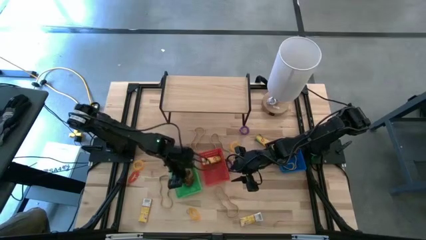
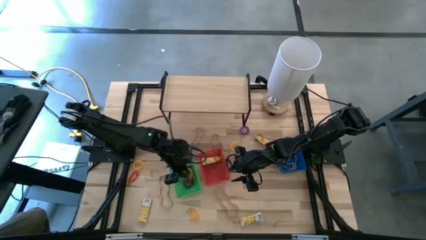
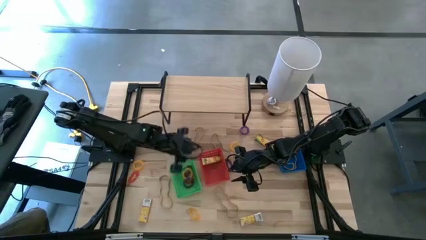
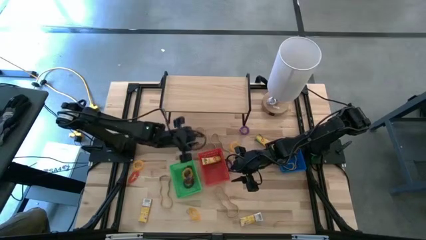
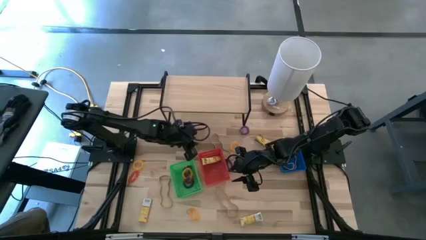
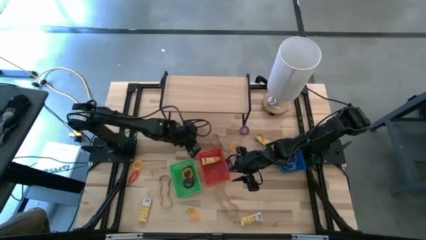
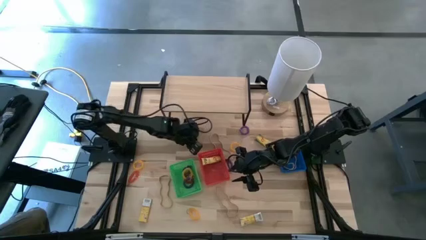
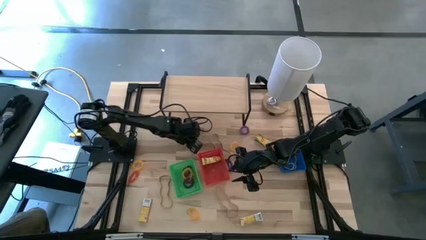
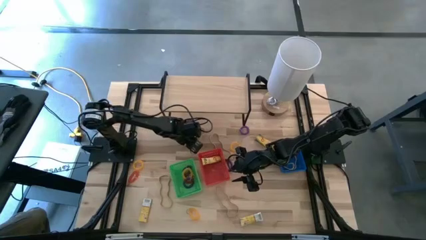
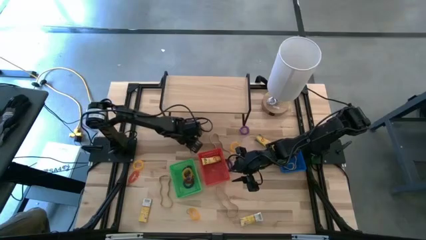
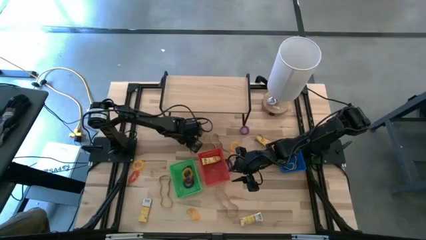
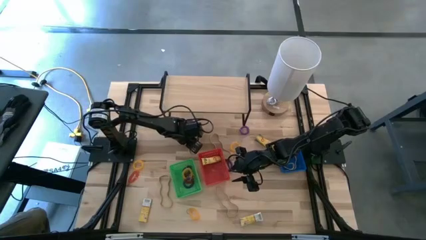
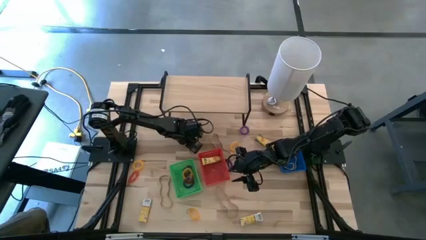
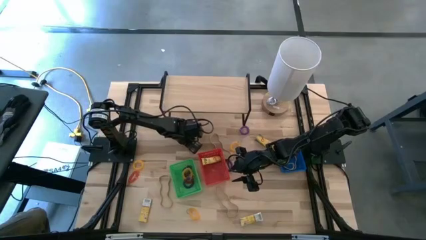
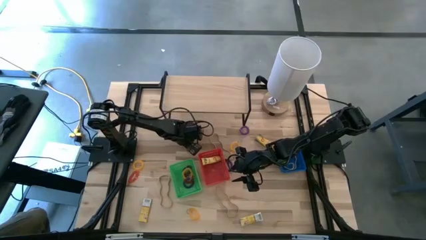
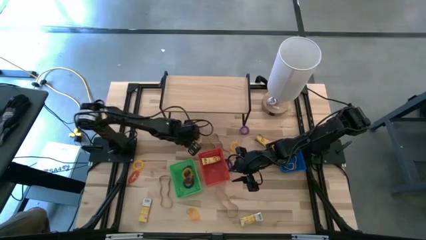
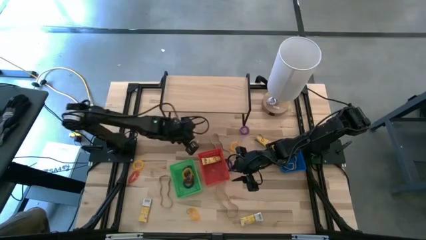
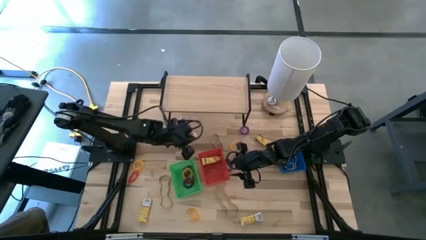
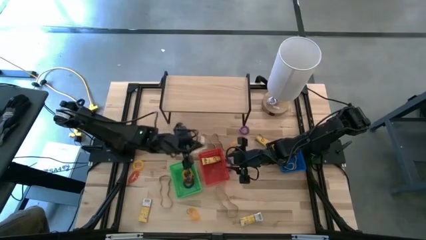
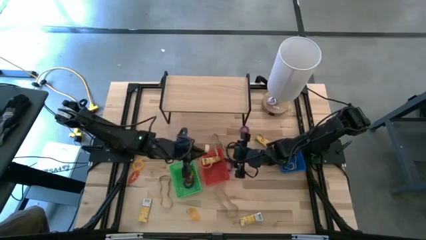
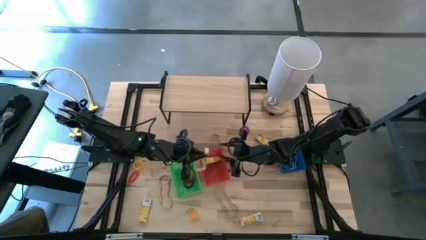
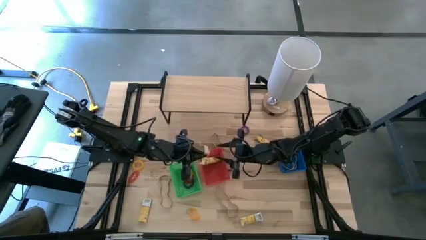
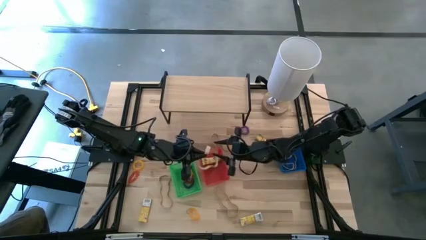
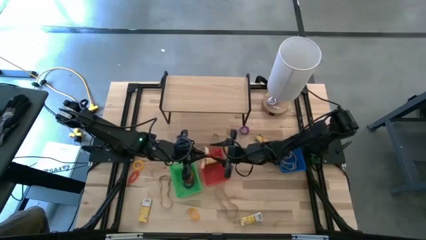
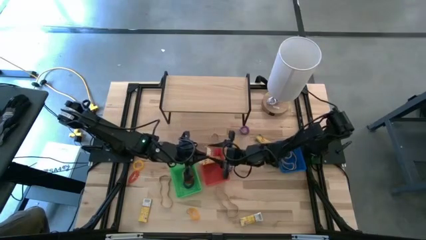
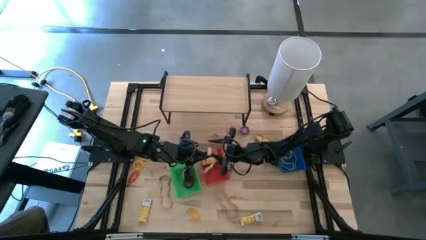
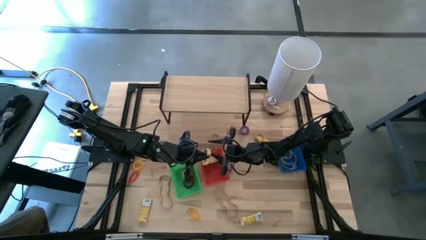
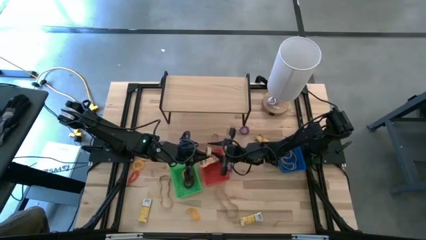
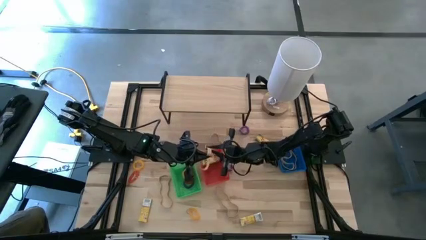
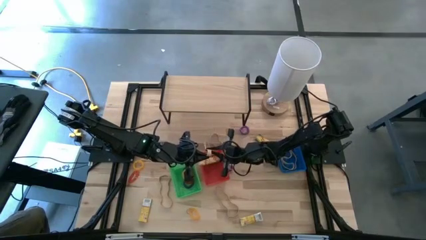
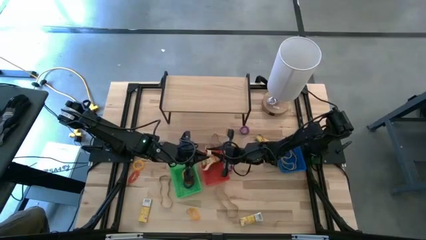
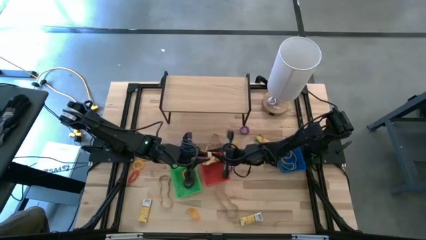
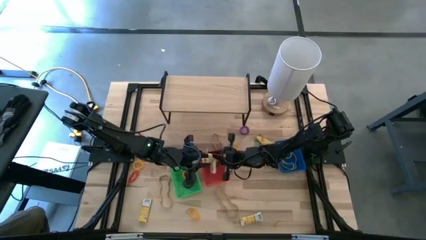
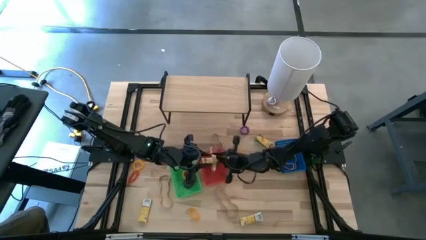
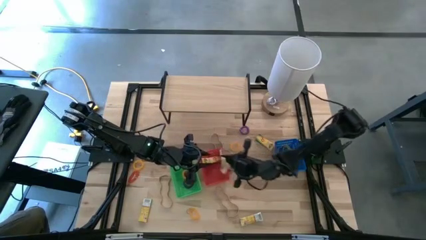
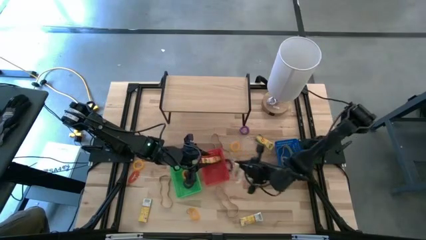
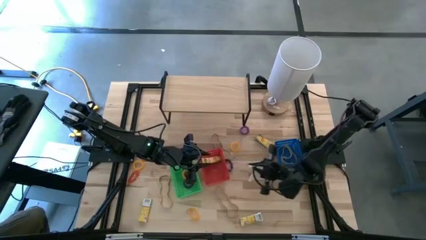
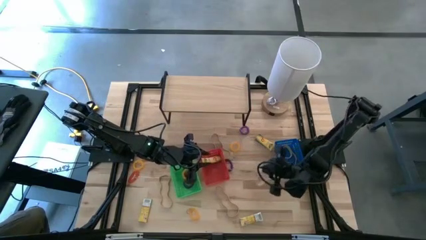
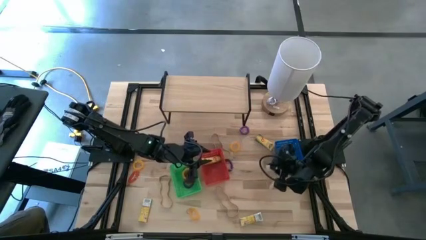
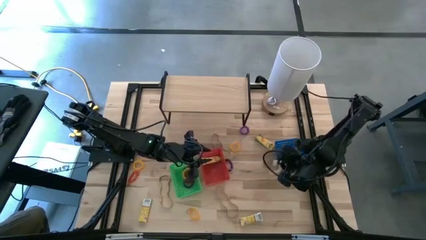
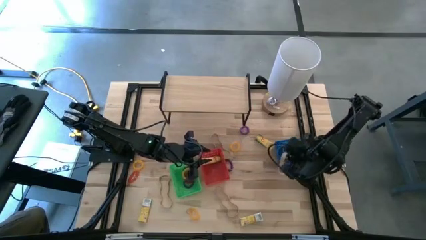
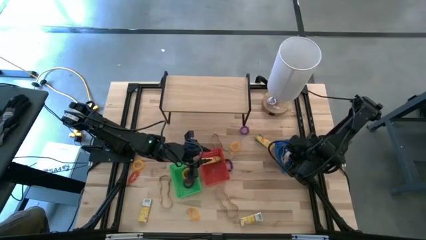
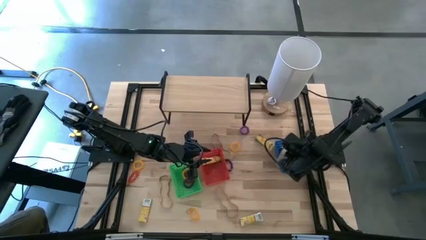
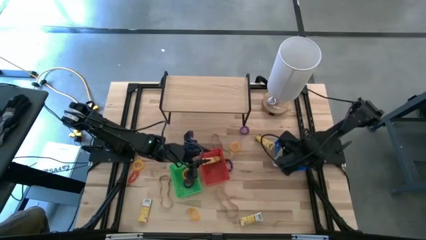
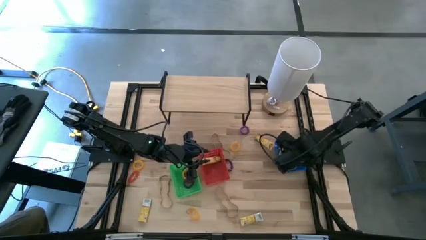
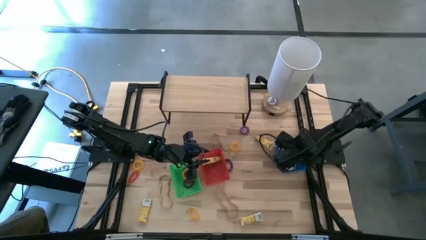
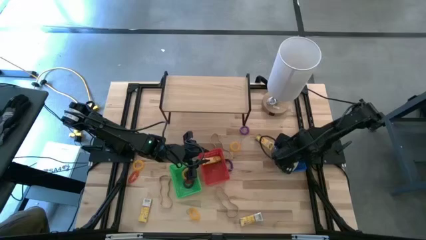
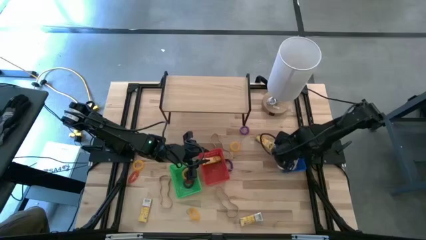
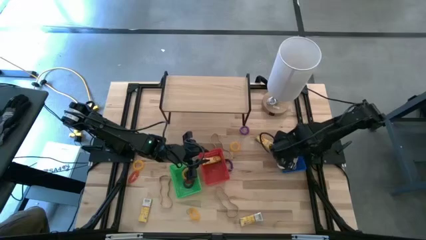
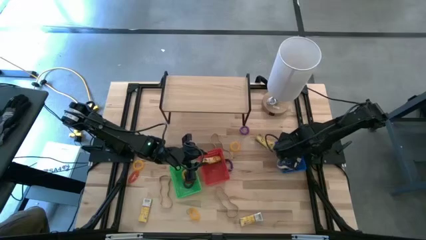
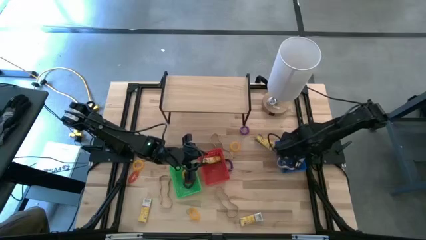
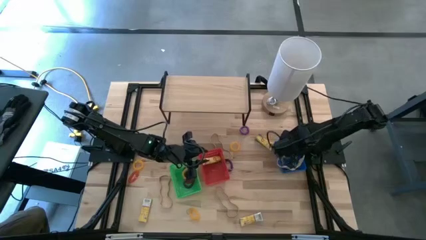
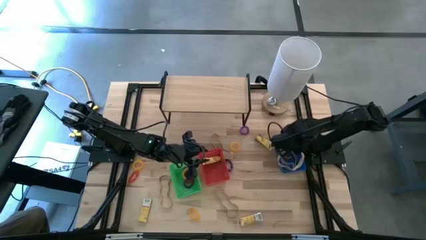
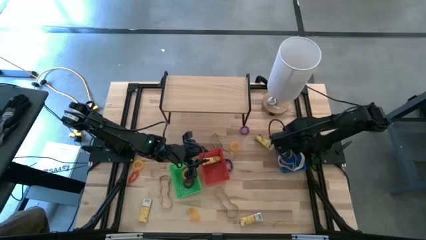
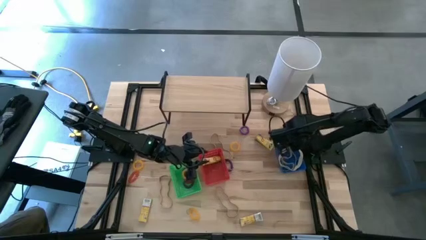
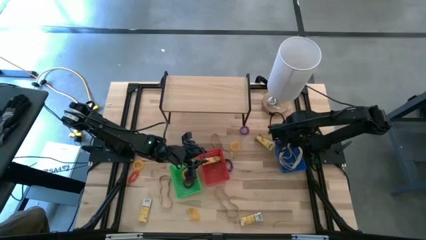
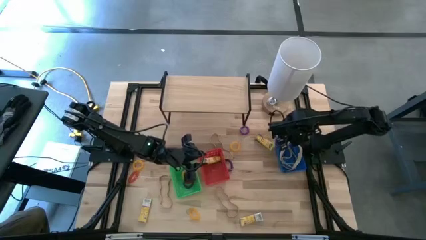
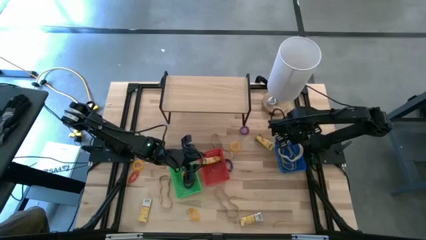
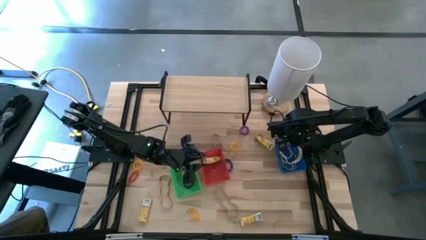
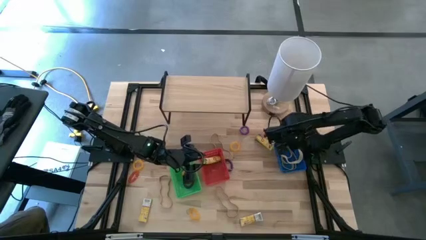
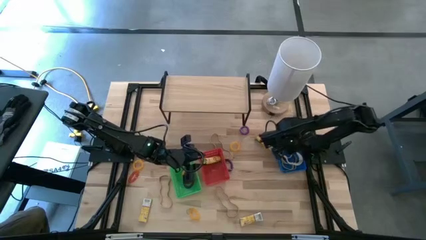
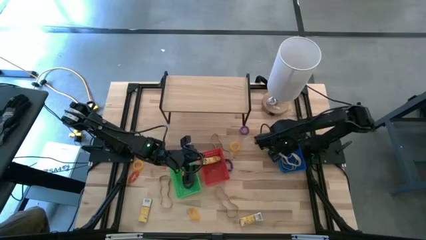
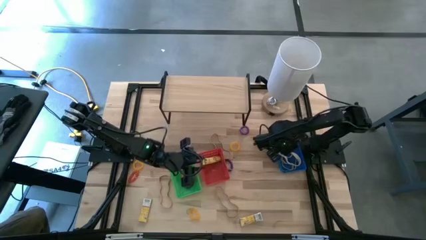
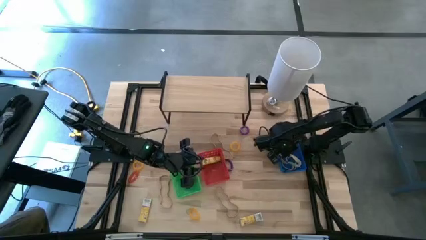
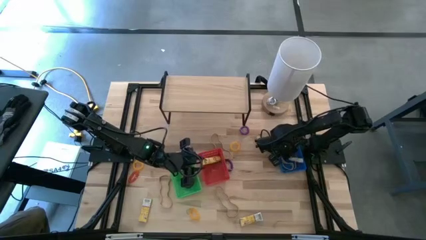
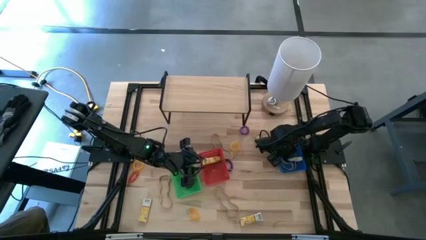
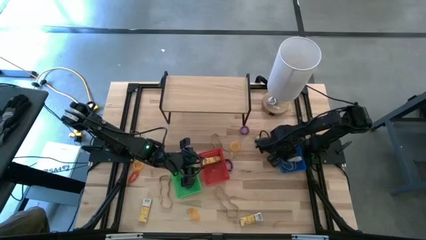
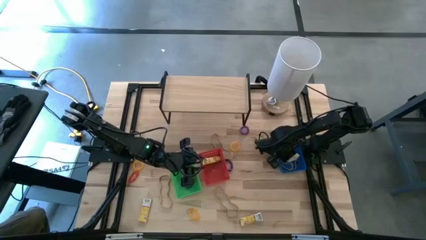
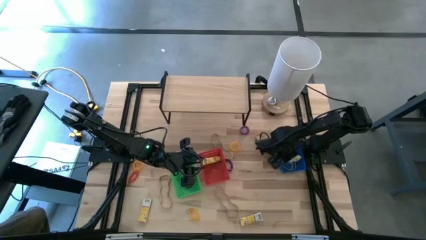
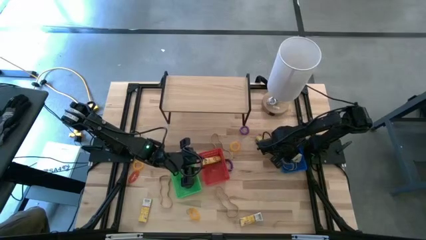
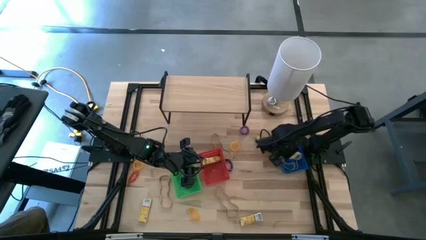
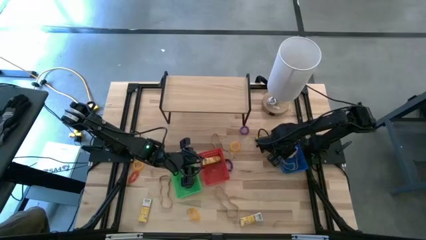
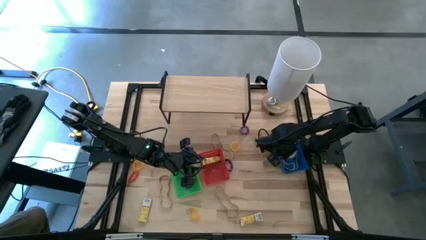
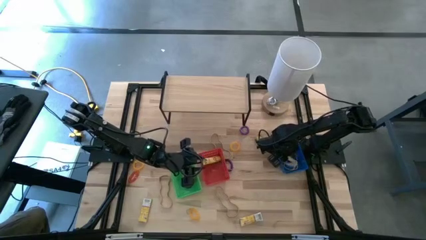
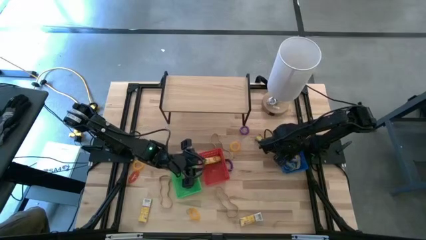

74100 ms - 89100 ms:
Task: Pick & Place Office Desk Supplies
Put the white rubber band into the blue bin
